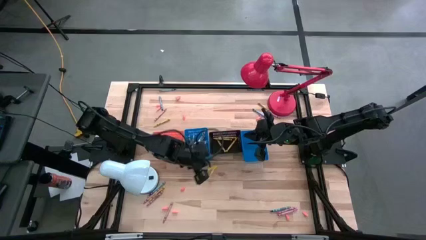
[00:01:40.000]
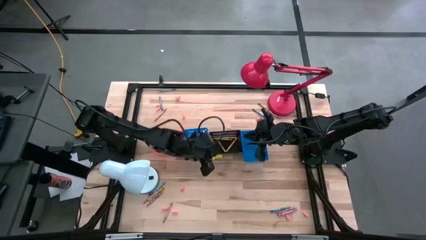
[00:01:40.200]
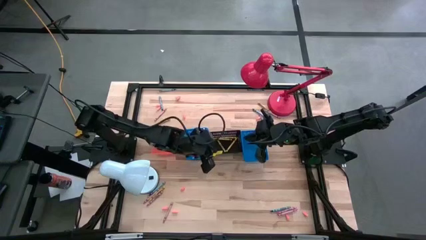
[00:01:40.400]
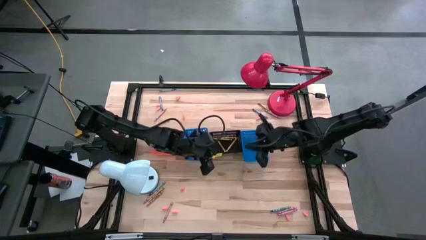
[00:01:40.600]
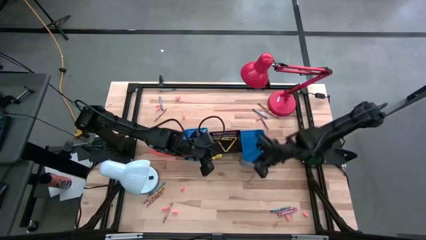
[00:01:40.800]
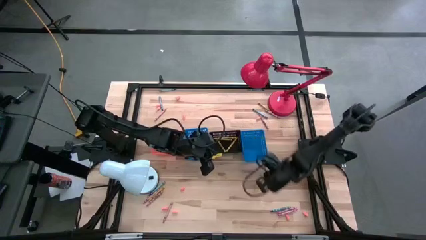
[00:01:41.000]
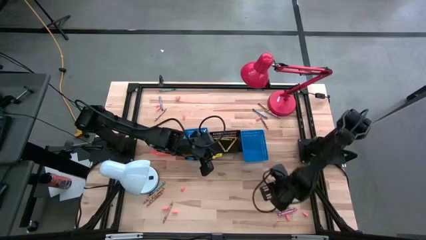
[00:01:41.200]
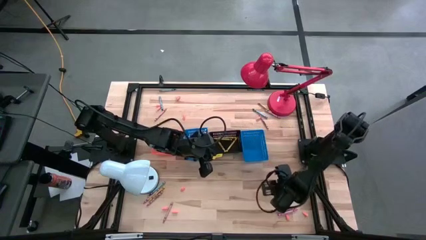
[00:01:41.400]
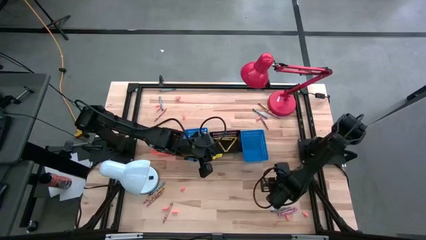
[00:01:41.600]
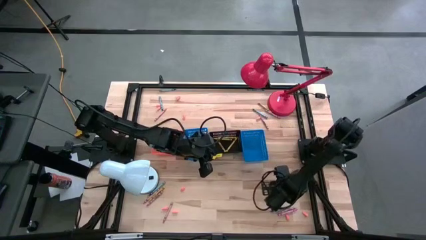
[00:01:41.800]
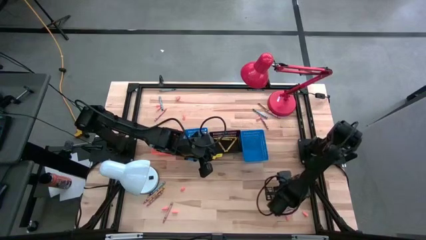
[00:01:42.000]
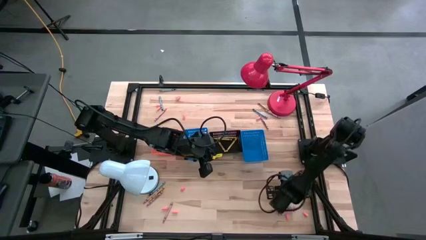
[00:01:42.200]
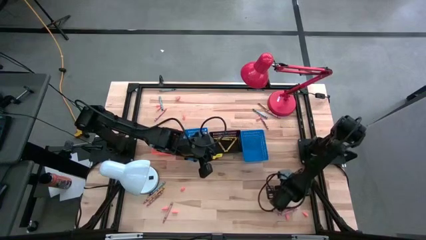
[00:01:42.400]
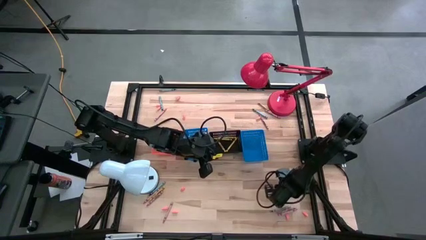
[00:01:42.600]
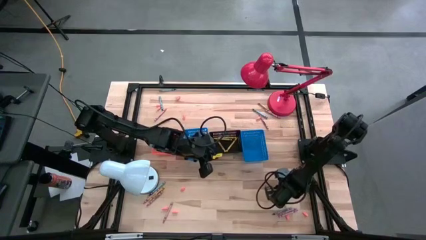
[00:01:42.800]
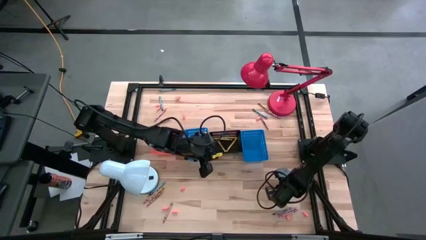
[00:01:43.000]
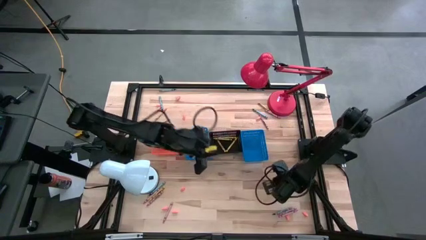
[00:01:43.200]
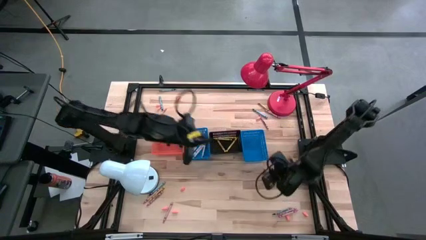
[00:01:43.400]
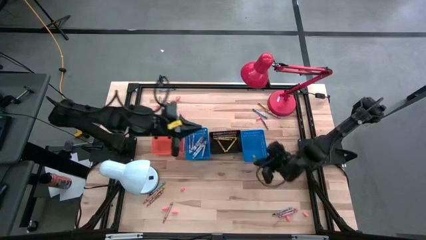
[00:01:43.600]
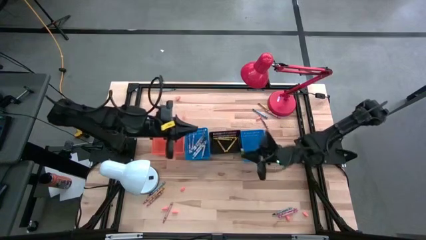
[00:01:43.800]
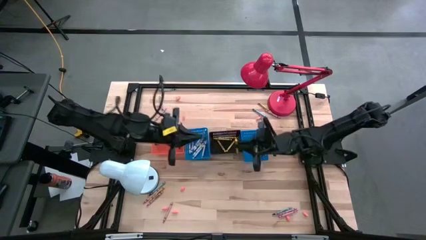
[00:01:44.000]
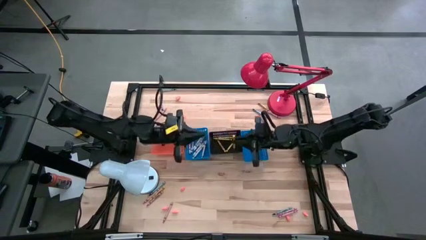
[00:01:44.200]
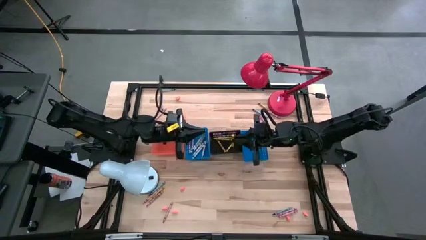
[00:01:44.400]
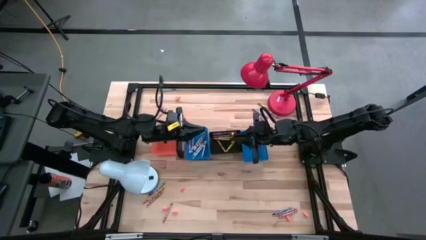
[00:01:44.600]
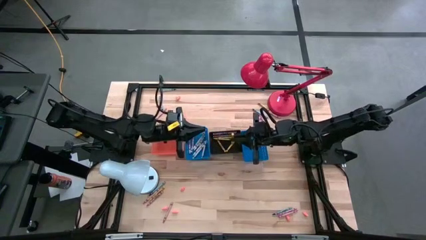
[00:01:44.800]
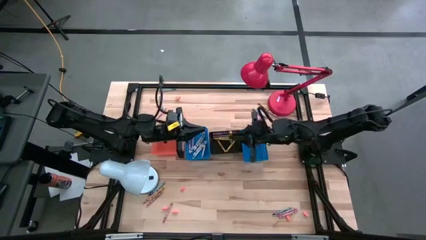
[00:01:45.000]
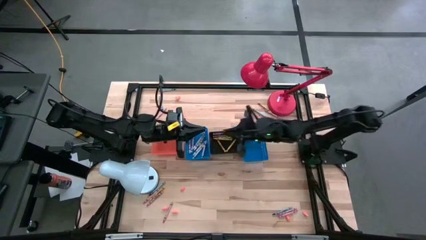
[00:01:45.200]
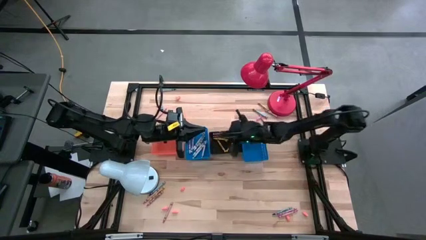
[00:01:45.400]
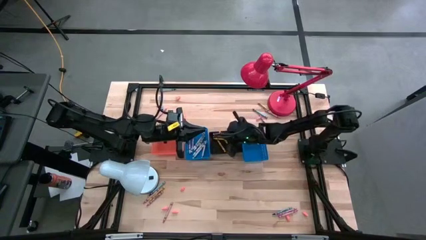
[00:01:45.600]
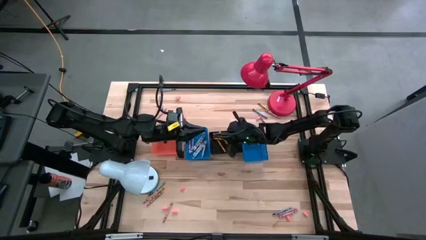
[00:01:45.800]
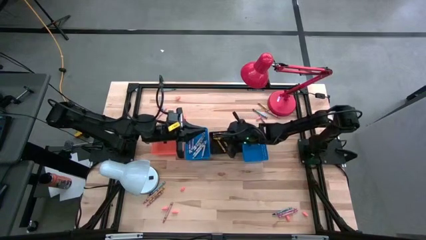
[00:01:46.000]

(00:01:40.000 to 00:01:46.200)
Task: Sort crayons
Put the yellow crayon into the black bin

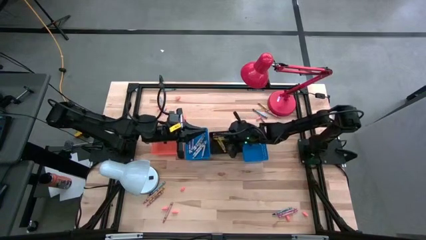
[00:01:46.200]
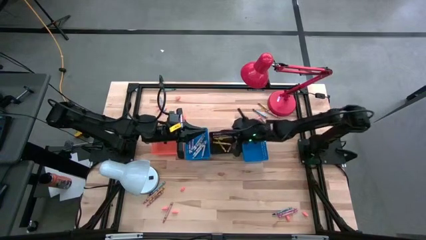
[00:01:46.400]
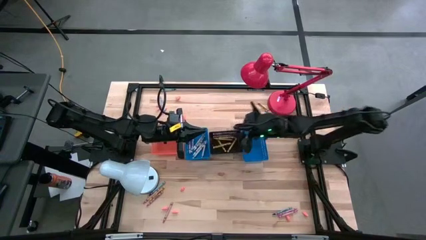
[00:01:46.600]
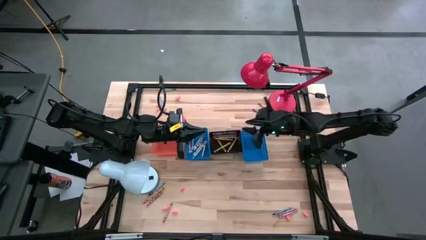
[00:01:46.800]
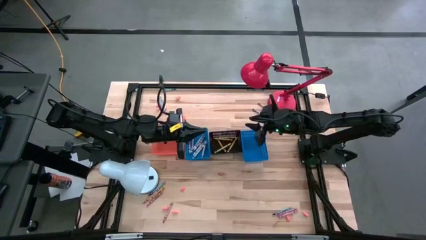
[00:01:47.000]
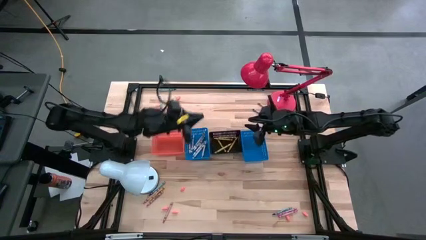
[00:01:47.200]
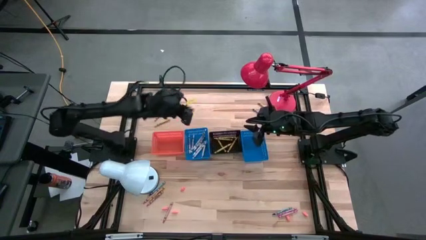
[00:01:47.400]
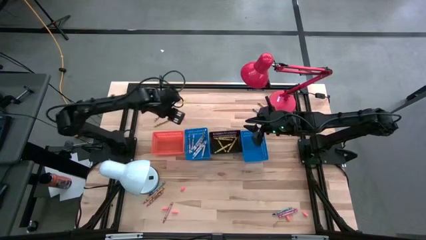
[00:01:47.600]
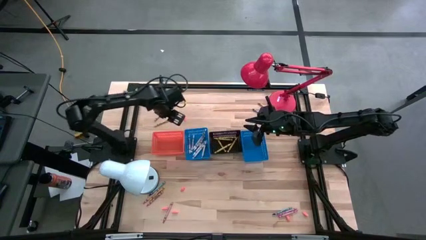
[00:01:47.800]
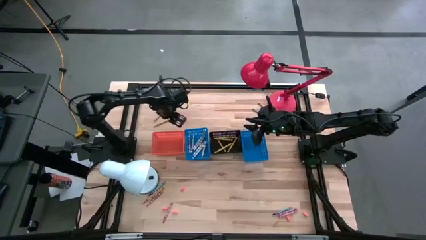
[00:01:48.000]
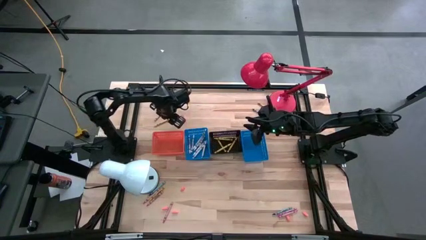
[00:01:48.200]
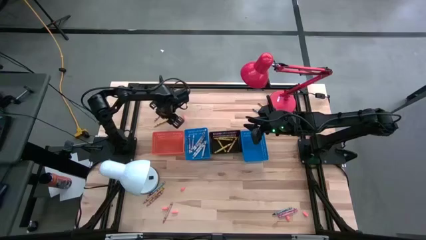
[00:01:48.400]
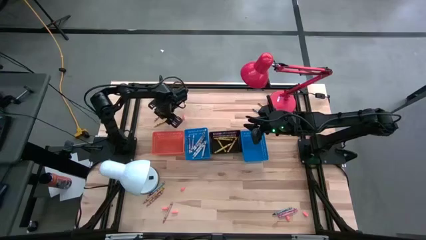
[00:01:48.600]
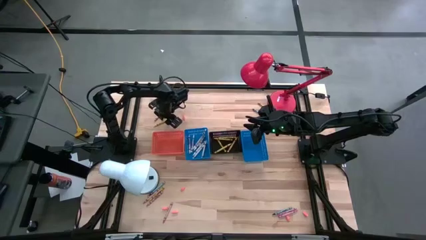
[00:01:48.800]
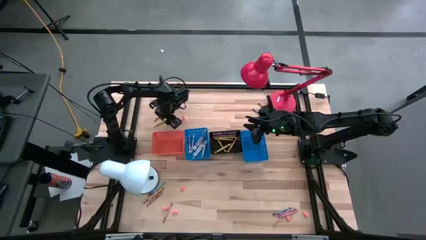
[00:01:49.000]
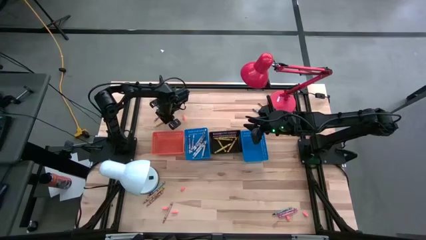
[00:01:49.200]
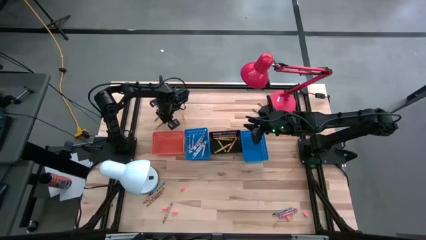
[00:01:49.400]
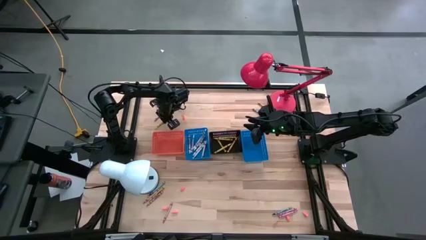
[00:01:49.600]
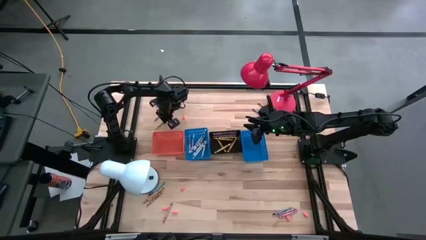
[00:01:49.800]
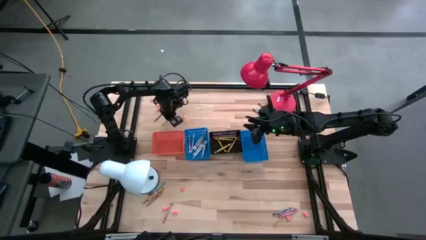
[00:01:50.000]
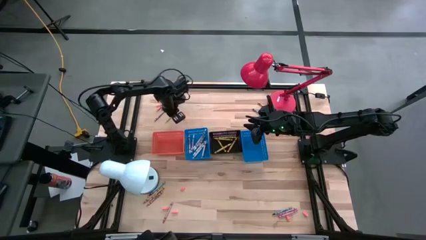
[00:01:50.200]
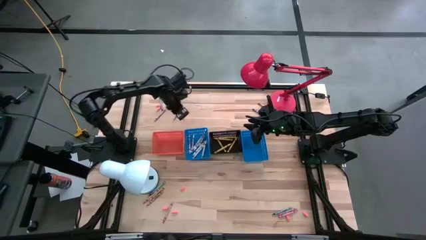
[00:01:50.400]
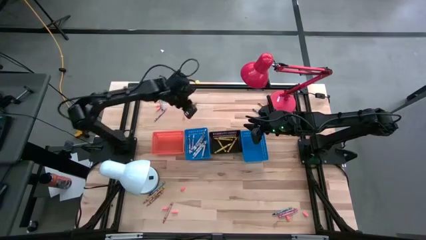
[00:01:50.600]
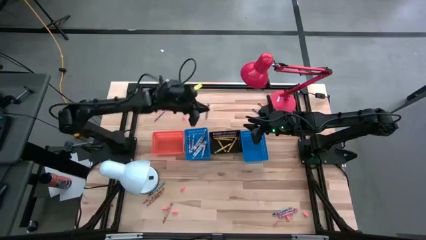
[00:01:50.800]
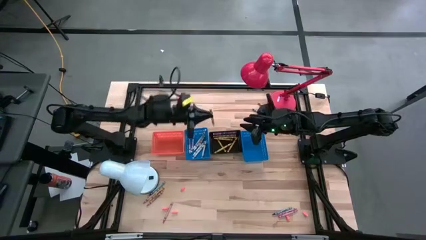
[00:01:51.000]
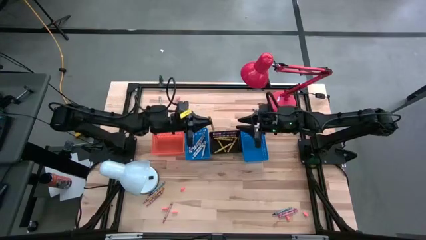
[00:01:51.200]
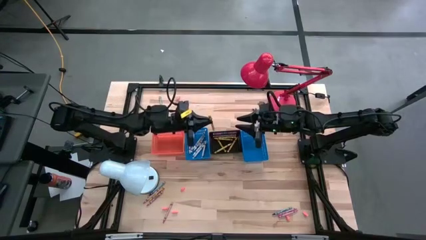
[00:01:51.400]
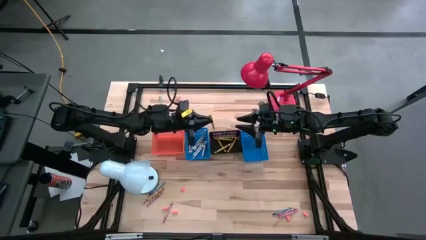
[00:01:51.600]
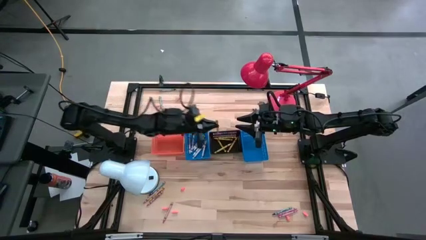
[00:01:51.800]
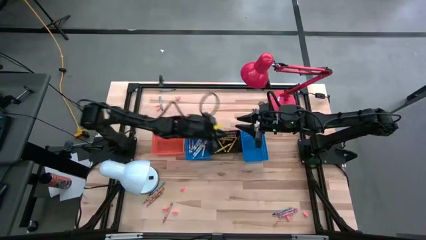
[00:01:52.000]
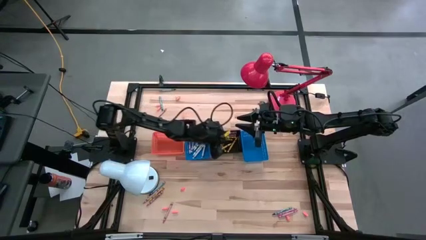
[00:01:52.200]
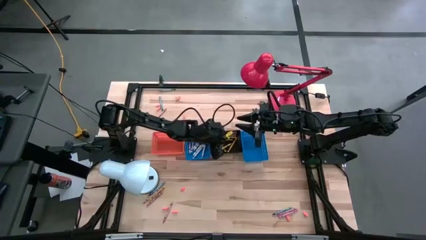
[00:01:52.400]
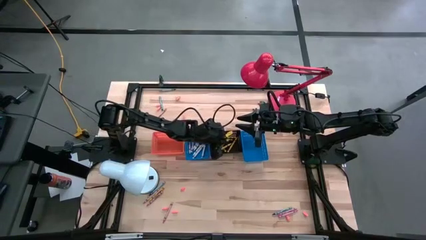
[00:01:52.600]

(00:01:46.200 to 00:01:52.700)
Put the top left yellow crayon into the black bin

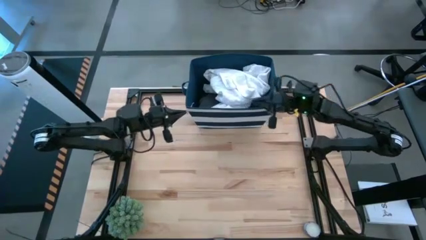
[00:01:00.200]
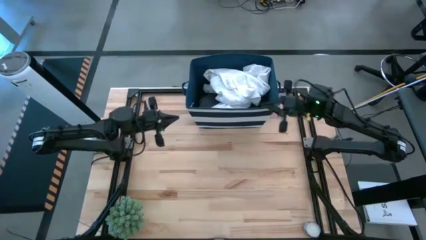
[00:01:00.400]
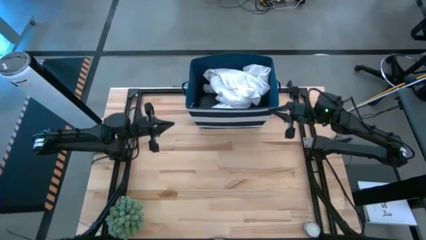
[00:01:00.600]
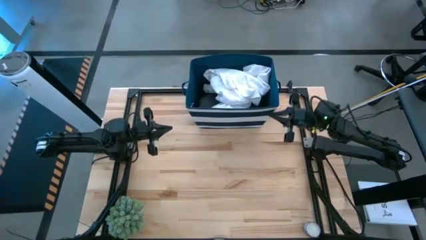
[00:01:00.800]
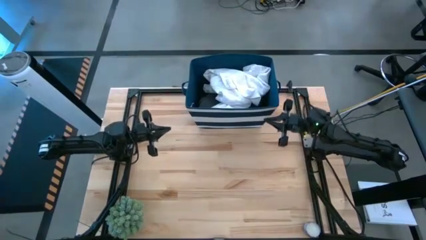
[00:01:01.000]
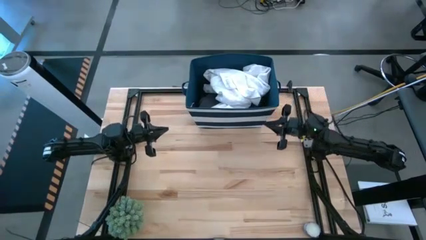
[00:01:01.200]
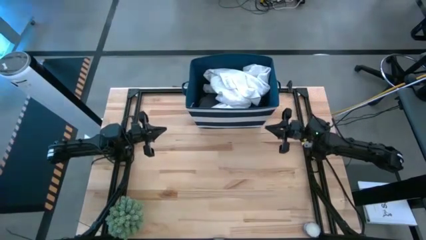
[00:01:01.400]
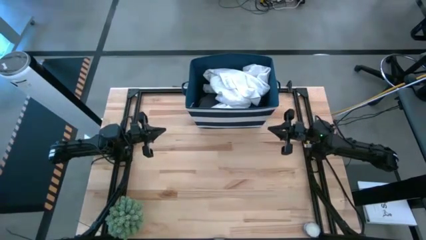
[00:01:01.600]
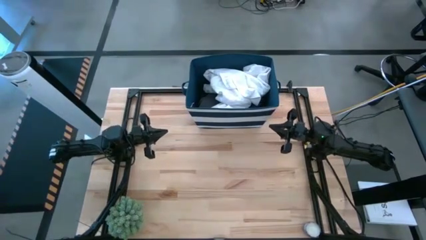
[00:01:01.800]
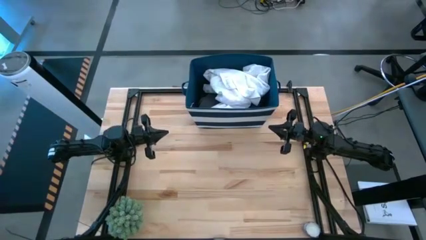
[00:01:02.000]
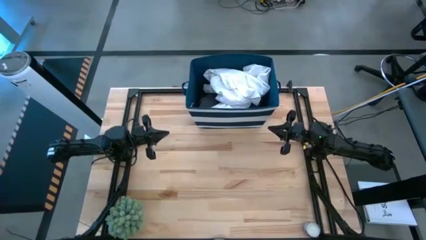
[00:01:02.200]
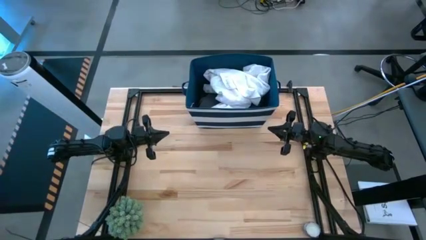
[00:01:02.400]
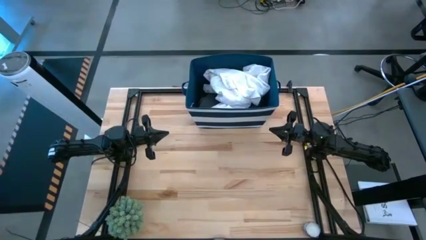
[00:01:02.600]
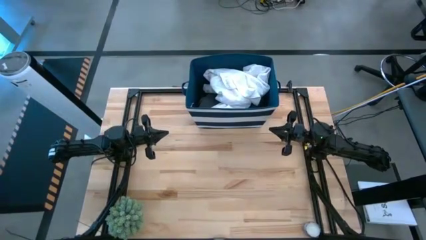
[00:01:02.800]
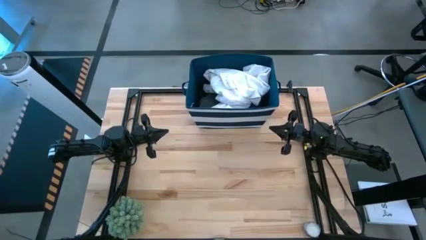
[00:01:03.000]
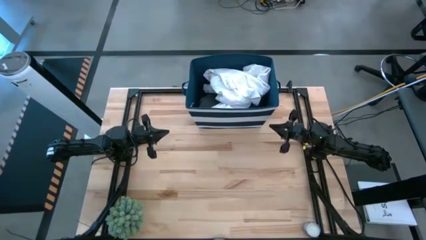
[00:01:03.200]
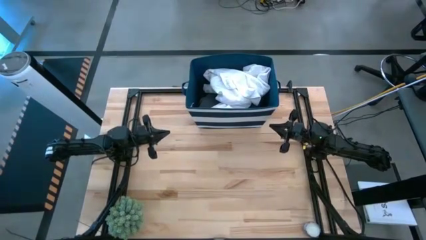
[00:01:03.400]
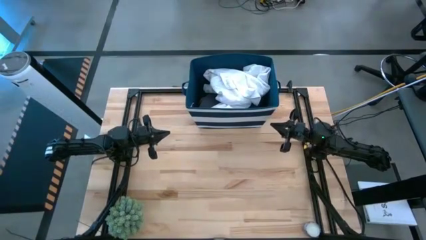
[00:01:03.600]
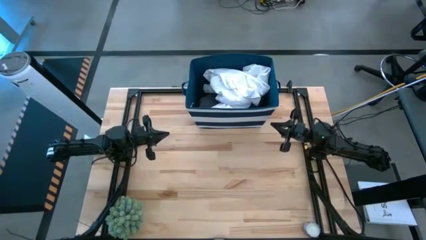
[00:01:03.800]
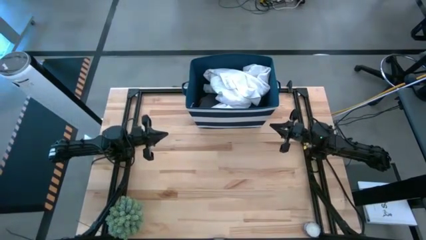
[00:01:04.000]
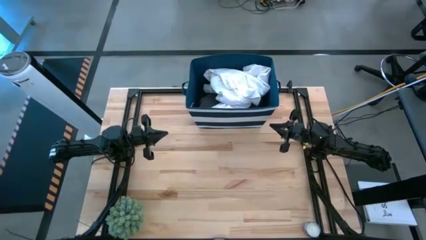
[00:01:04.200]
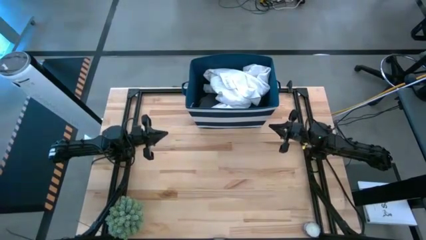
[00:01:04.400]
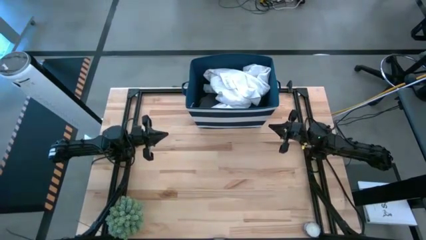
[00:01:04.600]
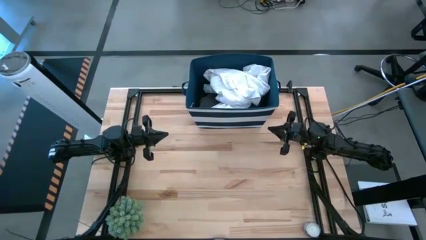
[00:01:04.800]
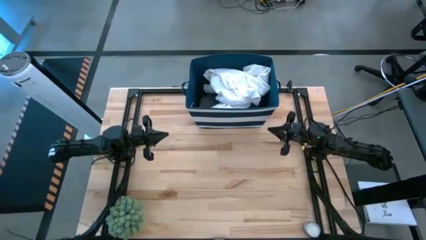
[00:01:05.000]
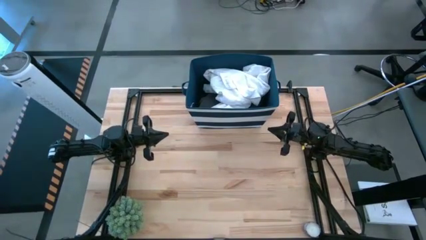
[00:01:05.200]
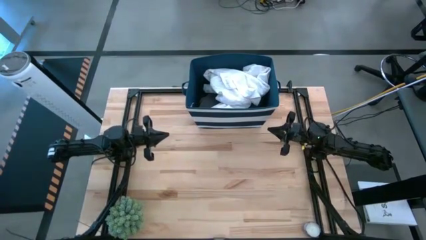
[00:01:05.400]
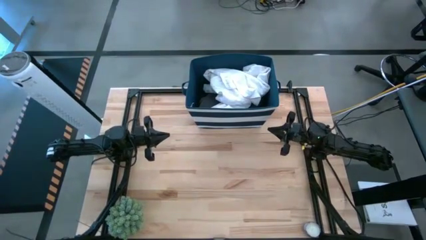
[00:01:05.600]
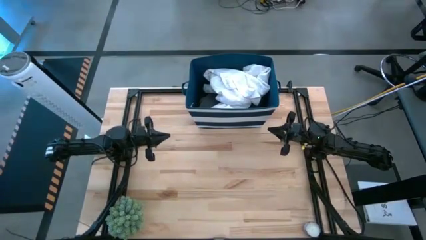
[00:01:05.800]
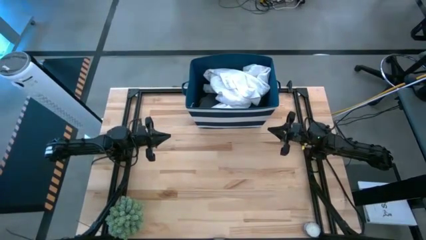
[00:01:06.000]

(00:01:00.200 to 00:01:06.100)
Task: Sort clothes
Return to Home Position
